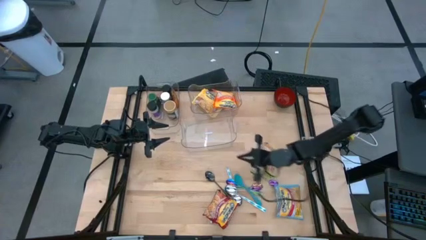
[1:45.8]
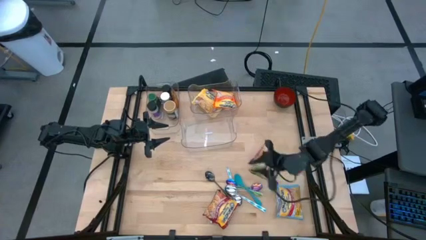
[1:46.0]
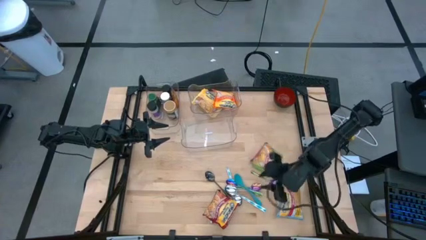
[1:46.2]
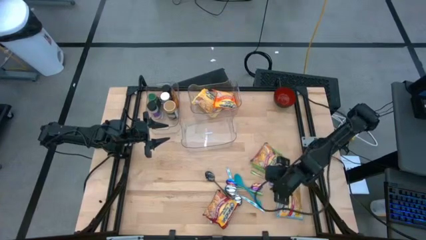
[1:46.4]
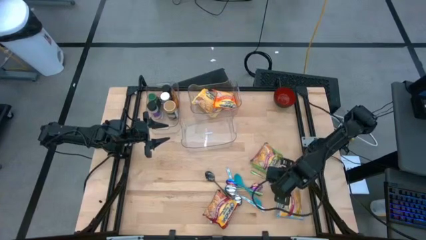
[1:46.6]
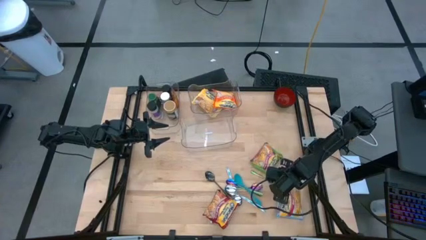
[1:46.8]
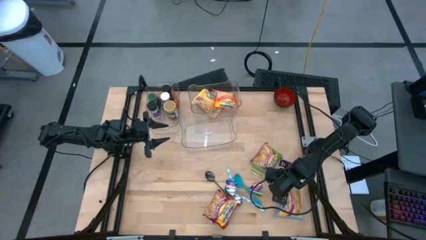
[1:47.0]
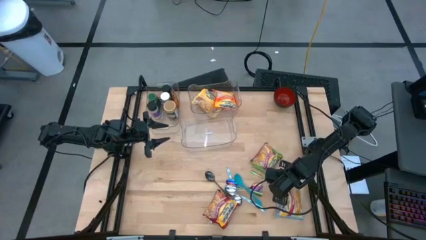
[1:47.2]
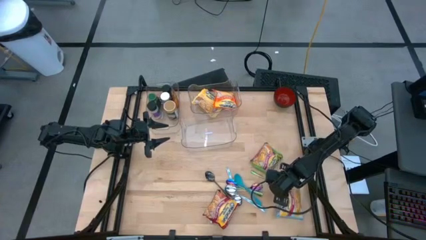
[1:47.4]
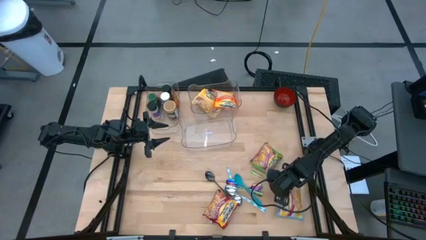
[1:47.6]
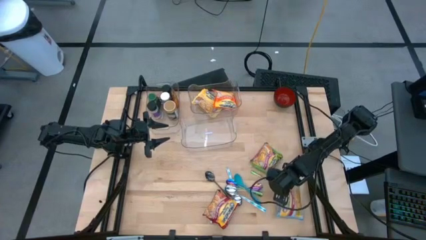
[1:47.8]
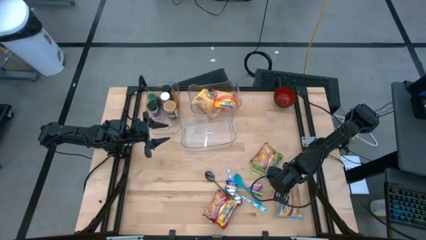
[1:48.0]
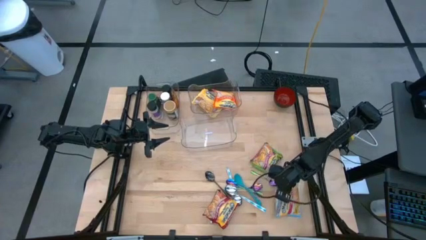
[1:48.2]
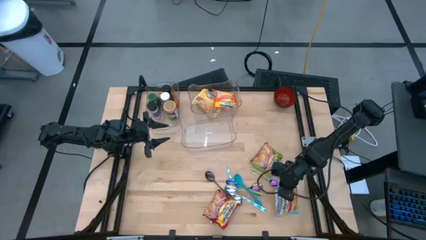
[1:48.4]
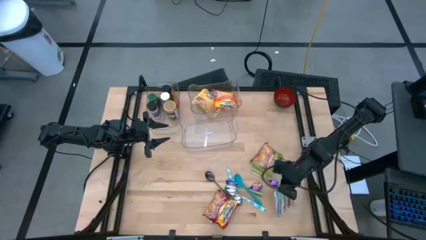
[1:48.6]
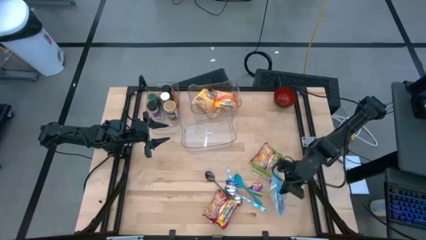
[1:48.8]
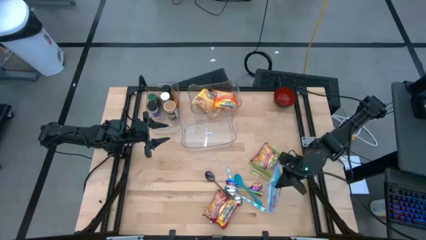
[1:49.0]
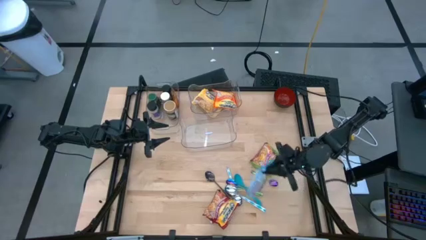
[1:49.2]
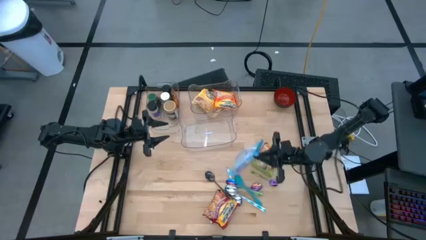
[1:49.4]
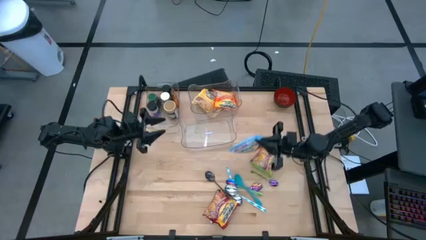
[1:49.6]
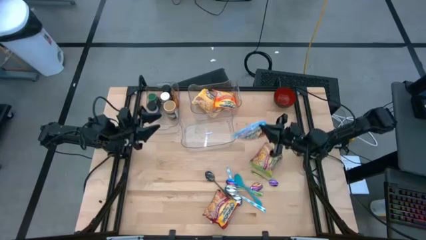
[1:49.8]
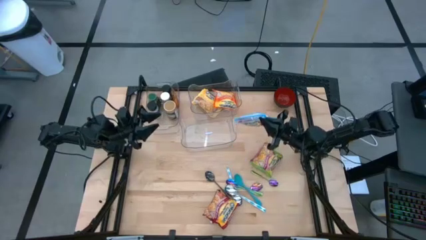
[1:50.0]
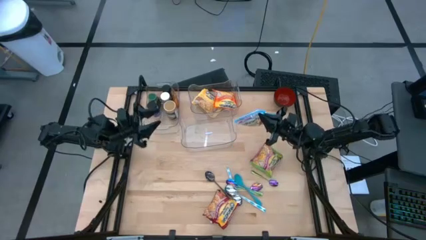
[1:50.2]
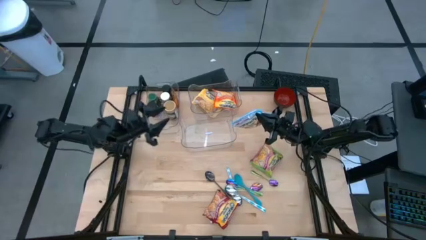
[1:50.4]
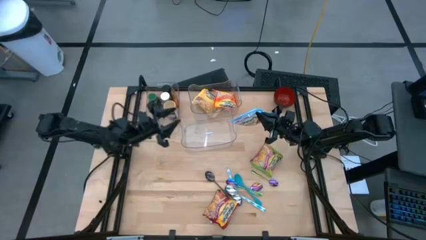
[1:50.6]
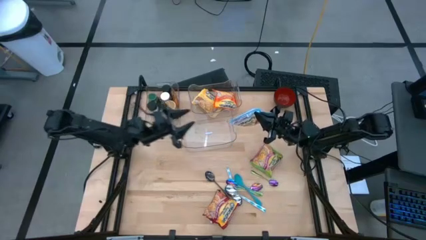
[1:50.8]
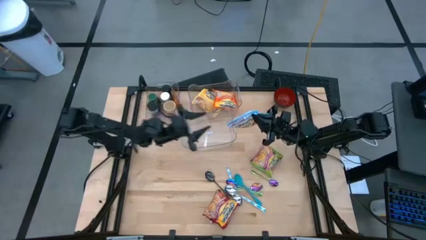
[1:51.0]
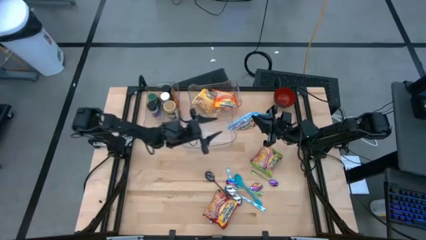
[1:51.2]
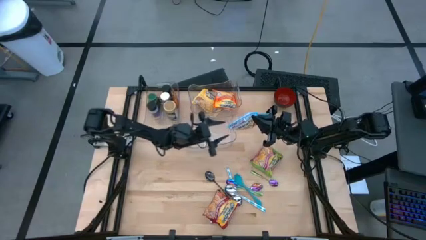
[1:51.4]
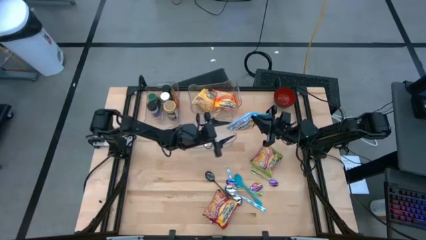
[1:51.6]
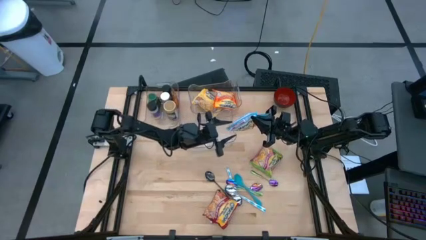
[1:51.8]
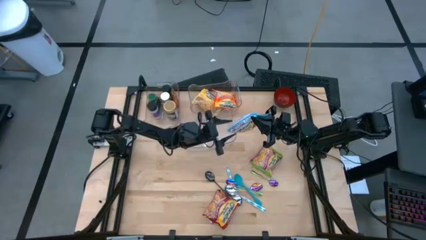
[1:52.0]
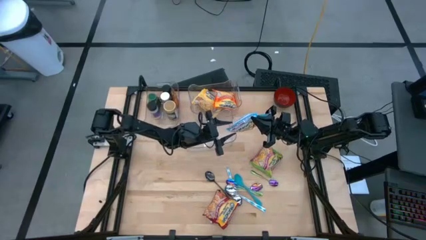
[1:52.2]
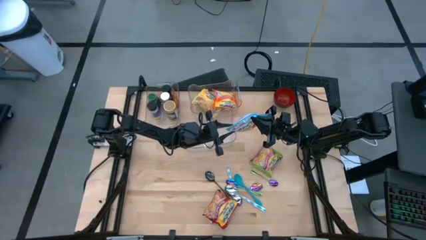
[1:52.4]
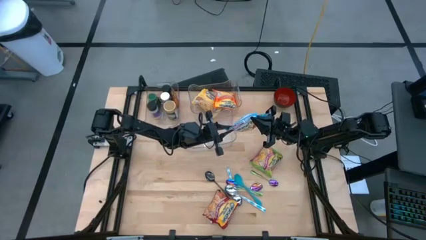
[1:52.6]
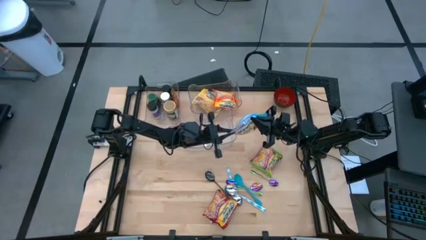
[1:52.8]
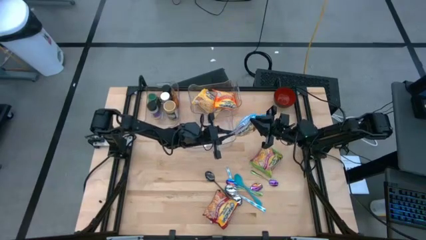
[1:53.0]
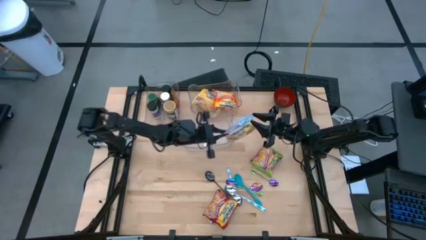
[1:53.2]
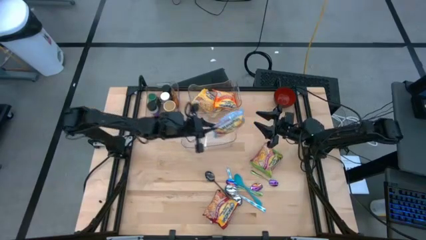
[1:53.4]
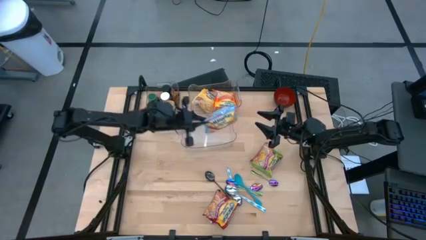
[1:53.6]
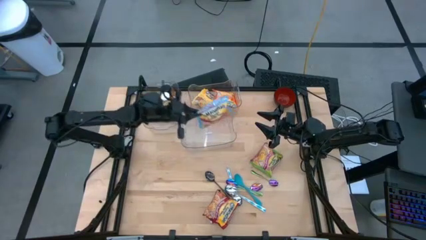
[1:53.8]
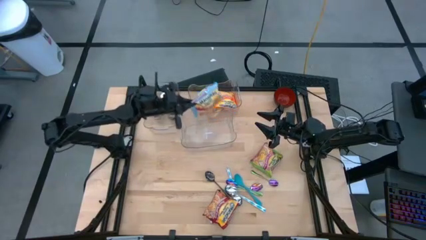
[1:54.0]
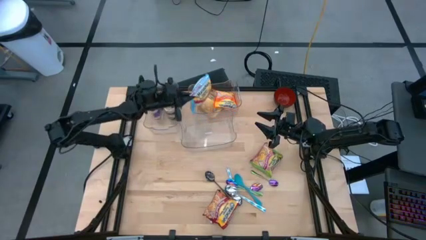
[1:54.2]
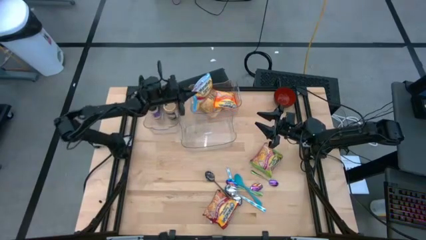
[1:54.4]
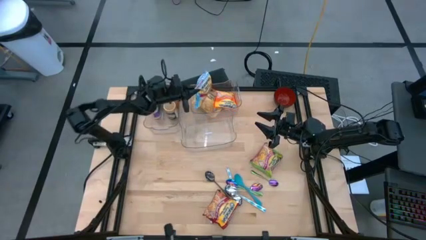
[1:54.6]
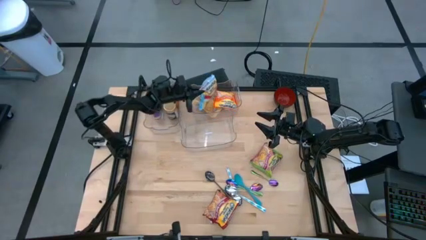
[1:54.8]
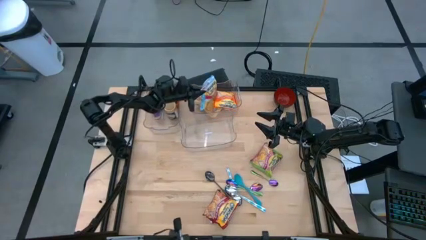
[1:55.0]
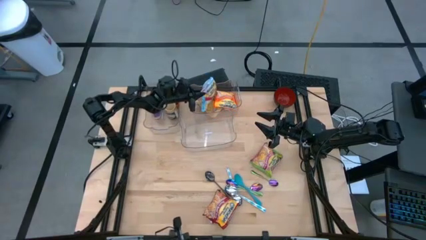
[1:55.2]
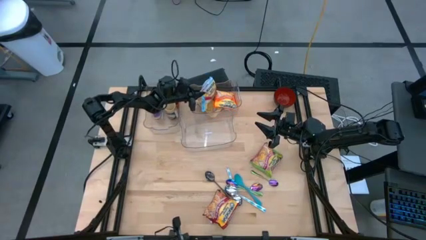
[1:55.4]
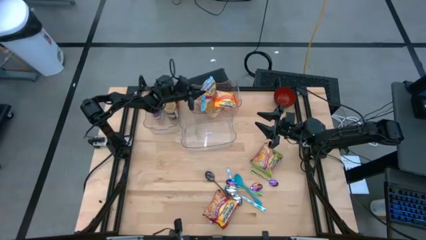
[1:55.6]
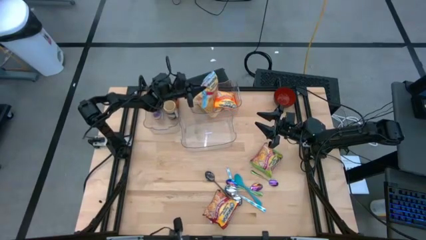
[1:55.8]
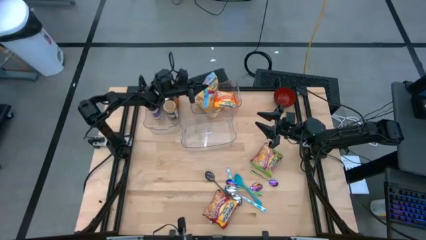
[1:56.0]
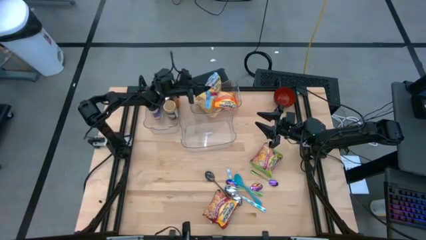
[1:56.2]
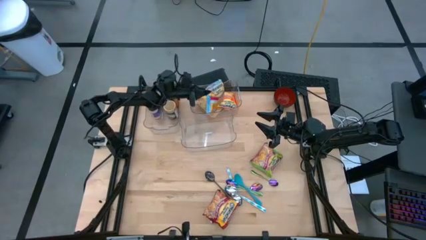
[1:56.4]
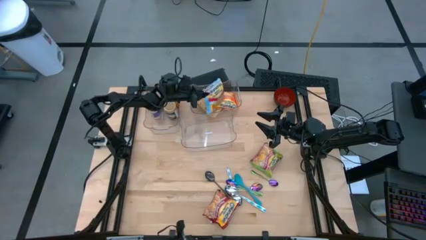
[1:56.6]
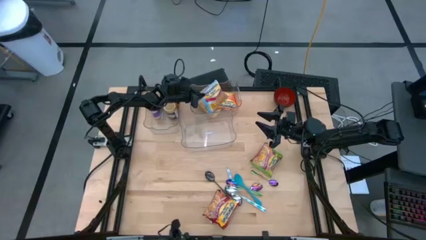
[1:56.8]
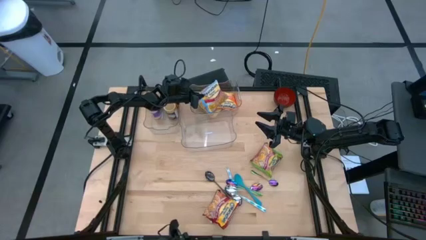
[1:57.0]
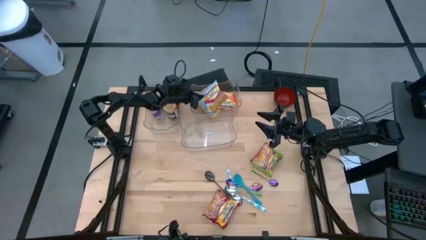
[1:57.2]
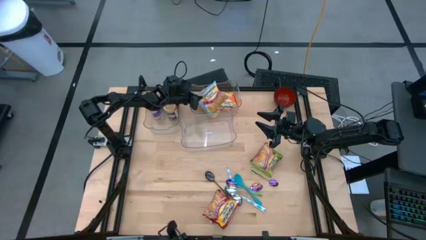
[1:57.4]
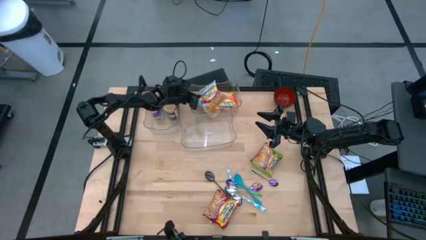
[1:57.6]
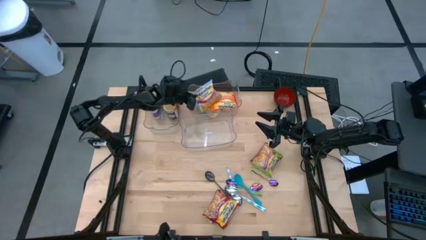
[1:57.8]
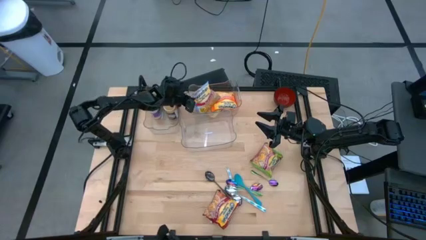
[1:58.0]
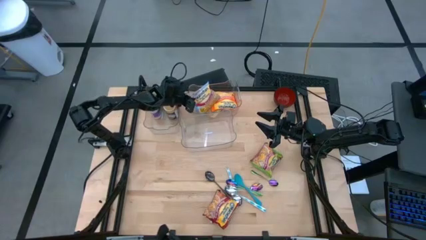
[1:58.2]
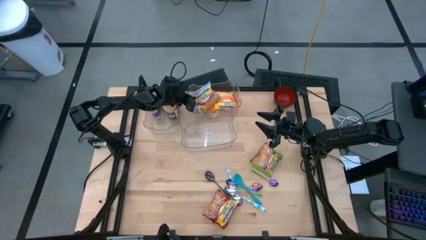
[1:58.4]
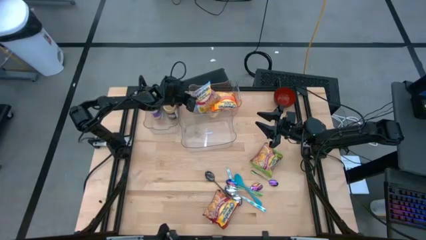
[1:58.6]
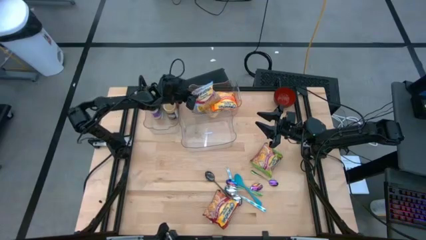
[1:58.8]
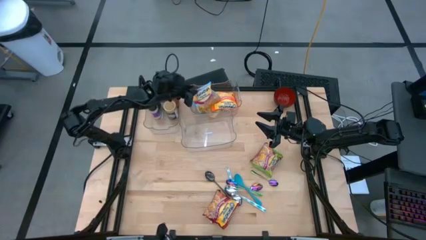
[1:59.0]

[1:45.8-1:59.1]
Task: Pick & Place Food Item
Put the light blue noodle pack into the top right transparent bin
